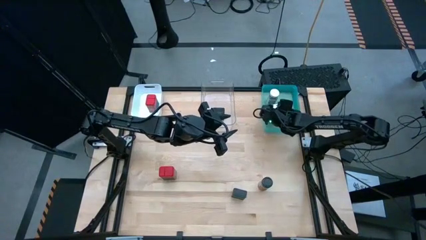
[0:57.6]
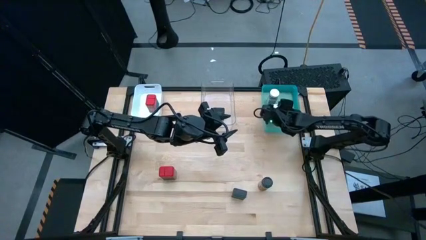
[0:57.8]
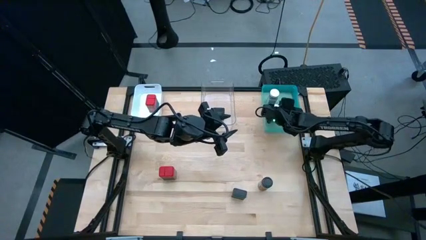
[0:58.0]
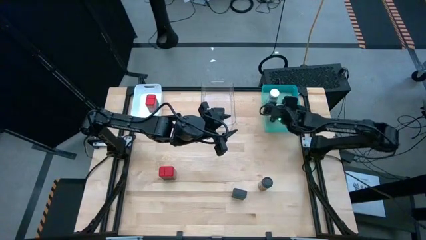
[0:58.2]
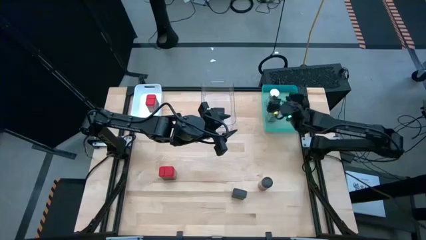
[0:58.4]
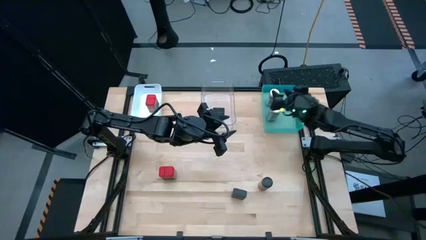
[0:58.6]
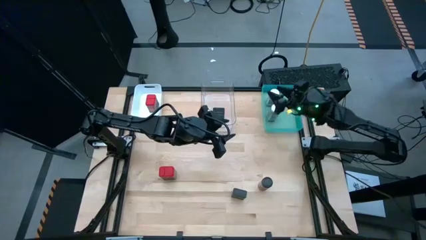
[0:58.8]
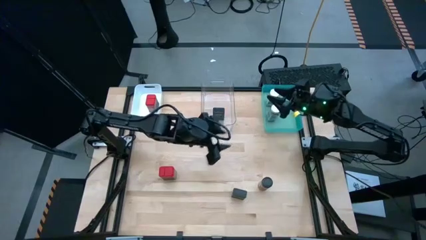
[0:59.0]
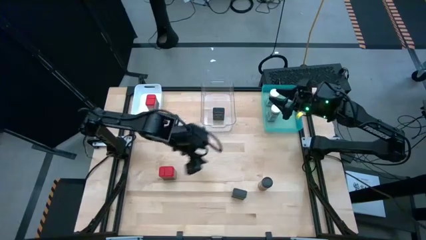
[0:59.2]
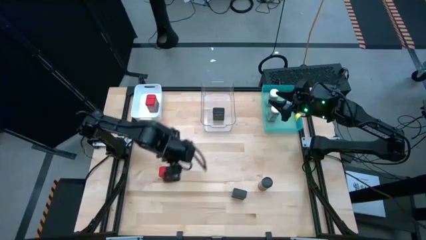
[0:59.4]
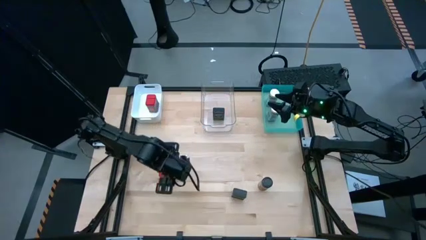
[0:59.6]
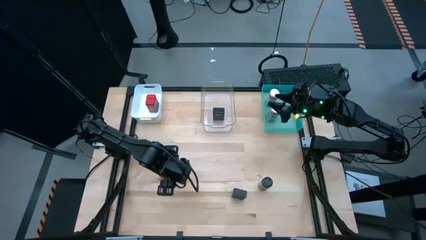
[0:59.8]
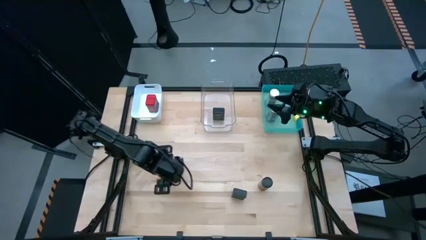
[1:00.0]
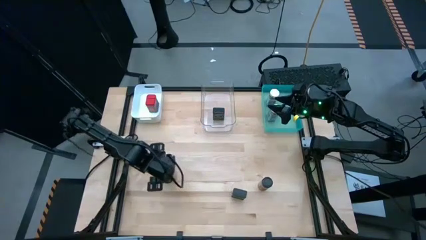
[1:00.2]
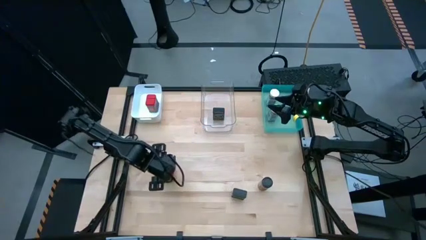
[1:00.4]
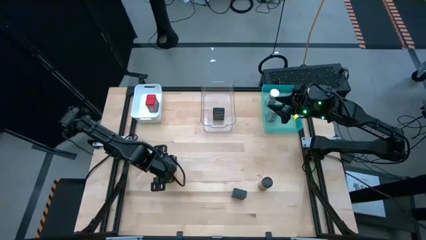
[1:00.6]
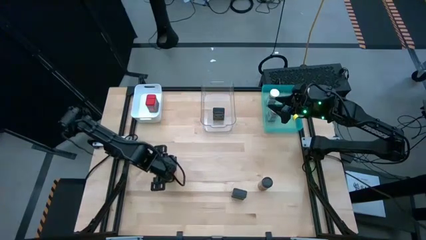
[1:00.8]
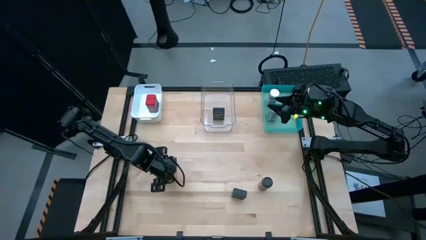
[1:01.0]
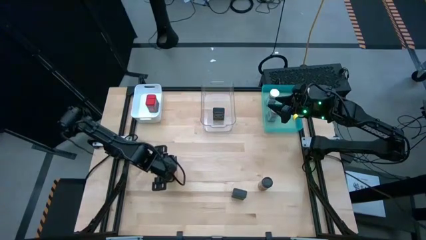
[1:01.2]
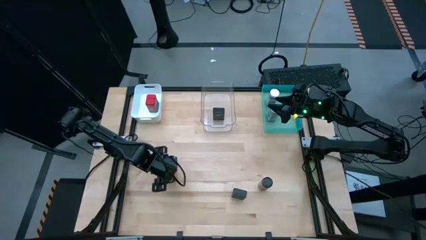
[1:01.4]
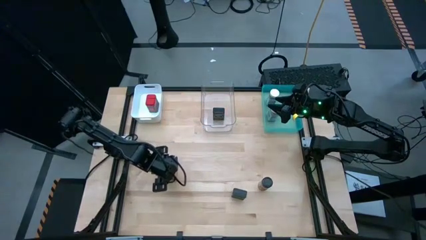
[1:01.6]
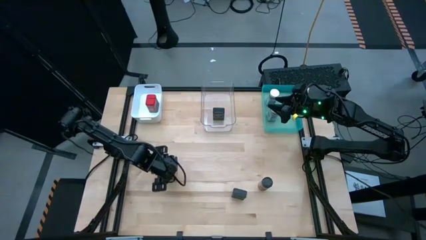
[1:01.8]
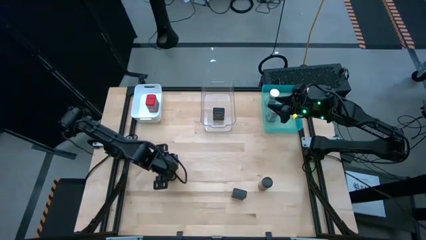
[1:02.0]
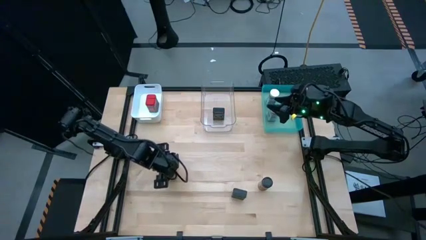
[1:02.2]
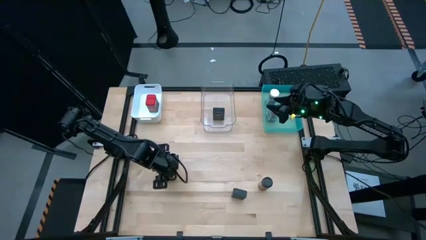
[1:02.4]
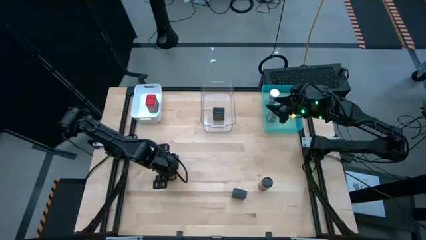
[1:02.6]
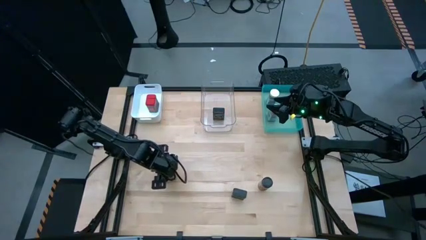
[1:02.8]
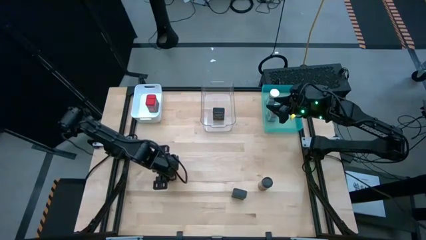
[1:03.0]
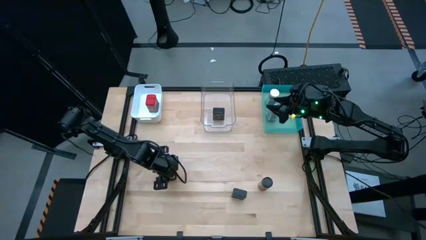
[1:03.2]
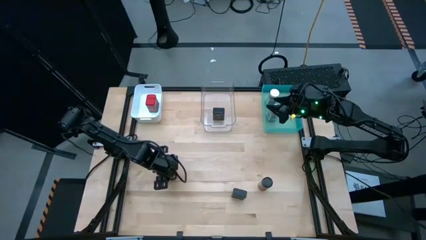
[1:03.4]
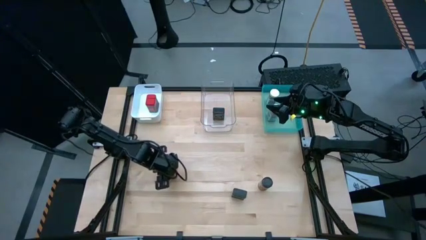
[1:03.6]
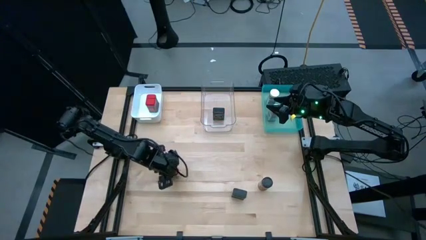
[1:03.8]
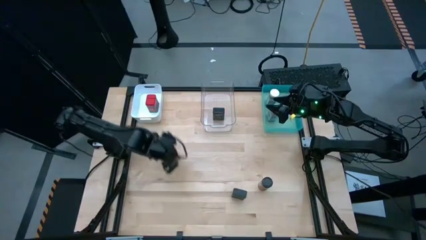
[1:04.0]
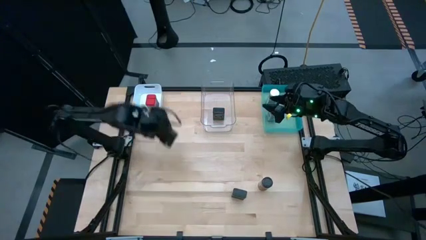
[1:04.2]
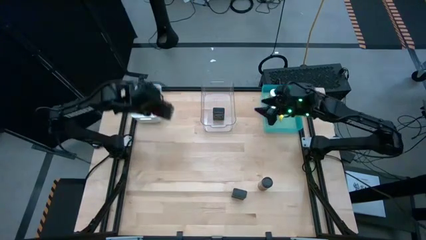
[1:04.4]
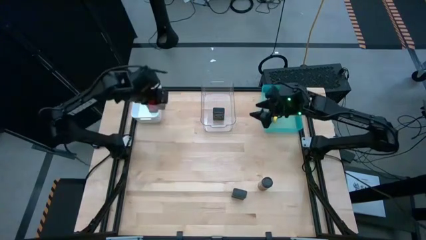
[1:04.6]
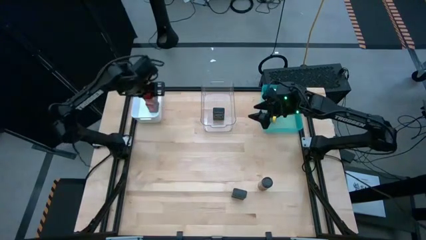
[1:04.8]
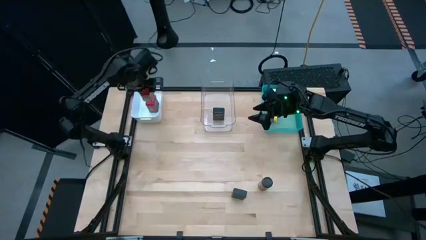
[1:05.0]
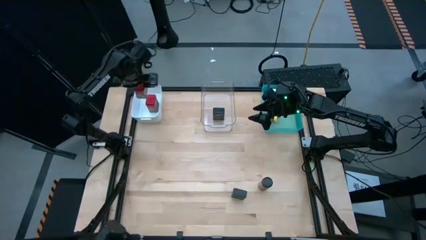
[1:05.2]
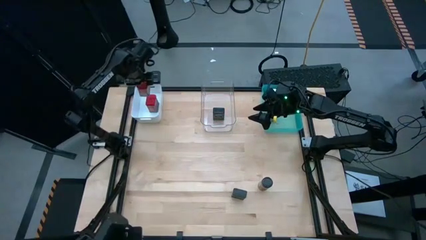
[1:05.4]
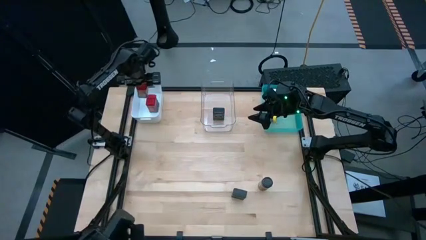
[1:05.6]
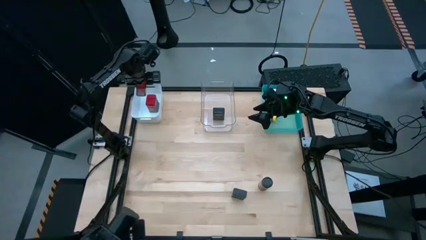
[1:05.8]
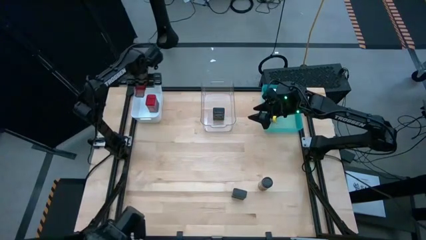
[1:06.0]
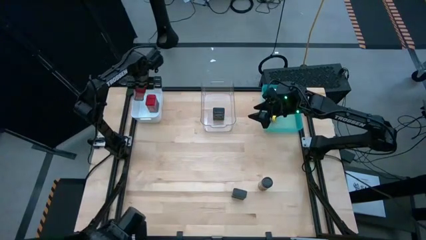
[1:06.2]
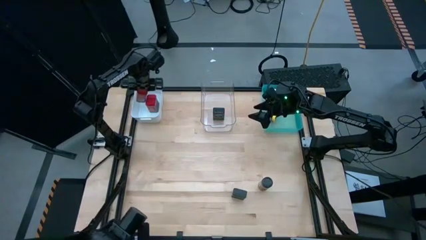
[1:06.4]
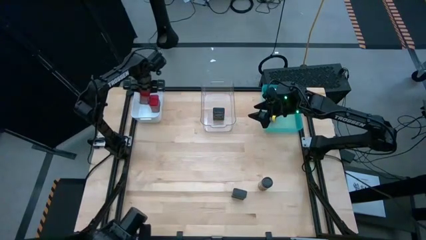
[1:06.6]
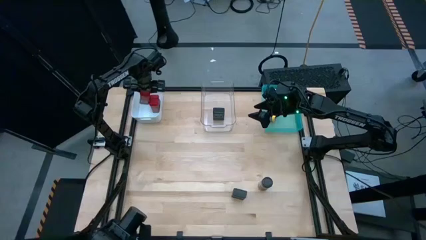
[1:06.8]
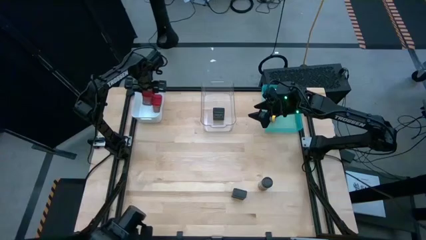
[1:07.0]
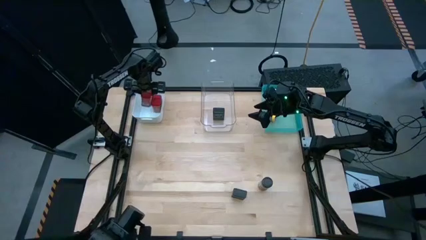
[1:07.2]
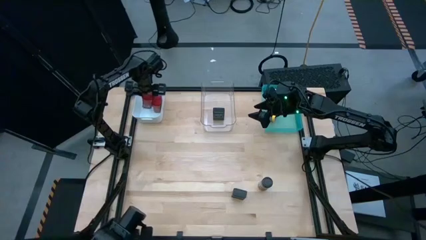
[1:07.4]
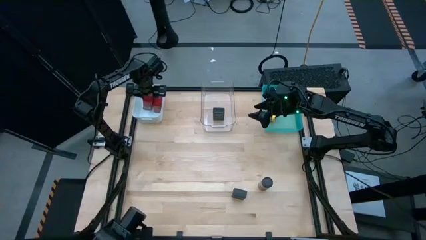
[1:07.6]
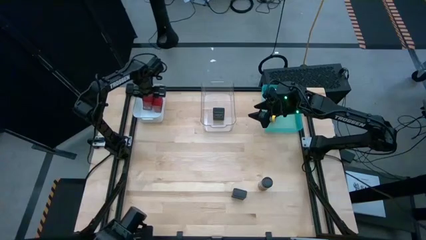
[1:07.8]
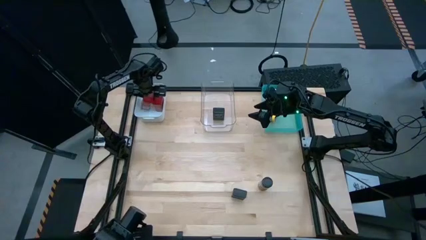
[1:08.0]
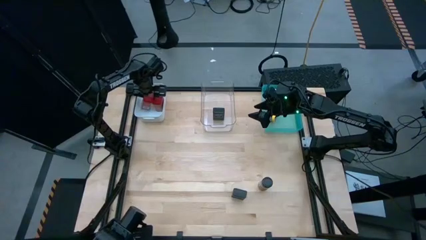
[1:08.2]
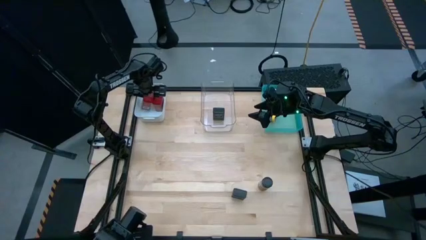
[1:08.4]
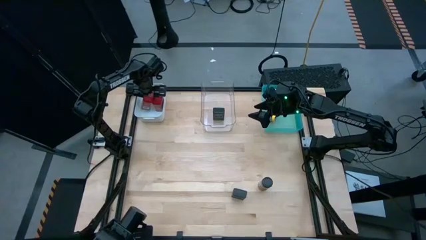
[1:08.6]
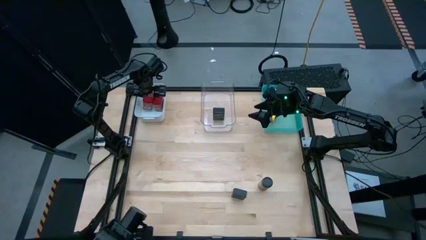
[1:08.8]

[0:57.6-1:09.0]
Task: Sort spices by type
Put the red seasoning can into the white bin

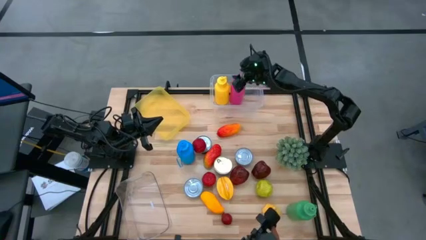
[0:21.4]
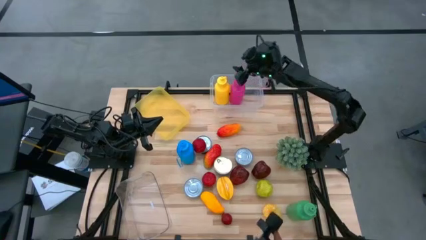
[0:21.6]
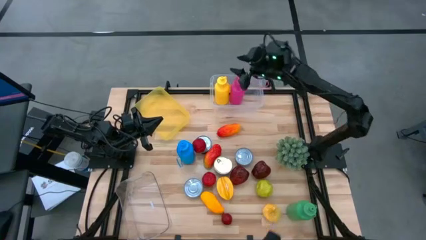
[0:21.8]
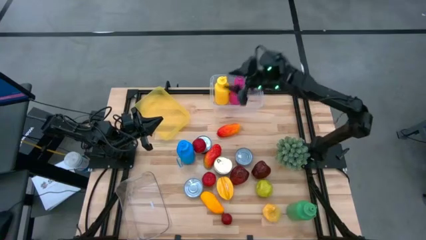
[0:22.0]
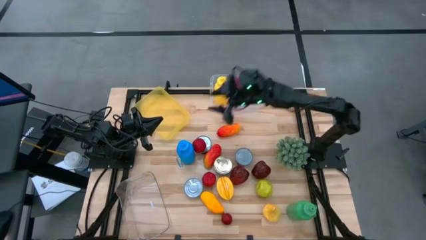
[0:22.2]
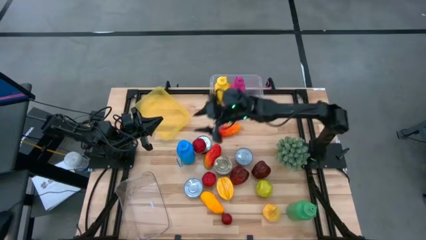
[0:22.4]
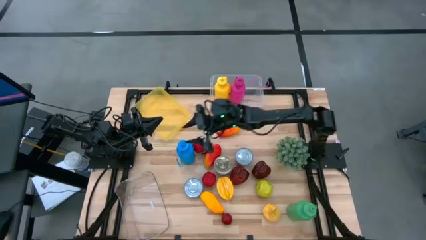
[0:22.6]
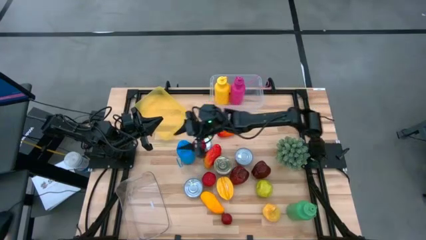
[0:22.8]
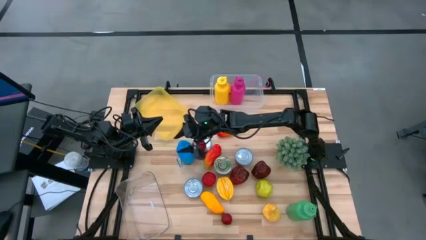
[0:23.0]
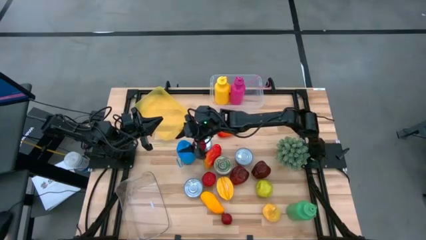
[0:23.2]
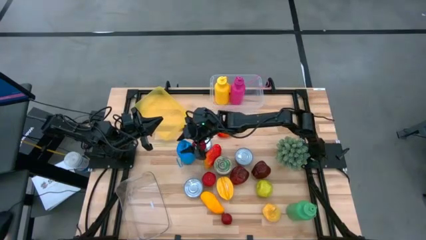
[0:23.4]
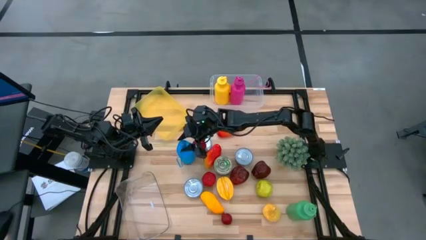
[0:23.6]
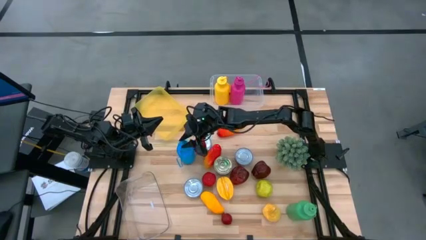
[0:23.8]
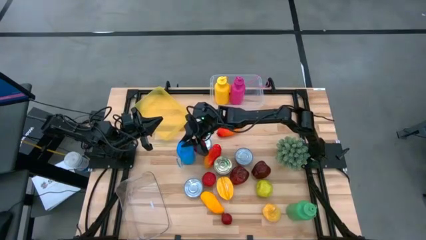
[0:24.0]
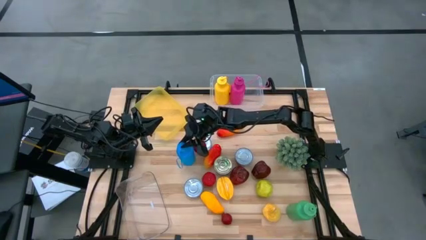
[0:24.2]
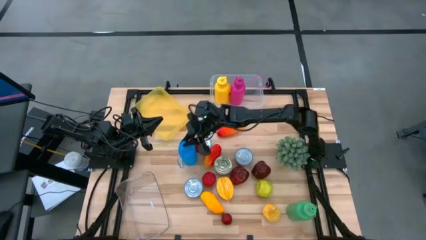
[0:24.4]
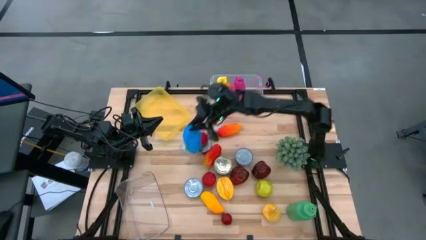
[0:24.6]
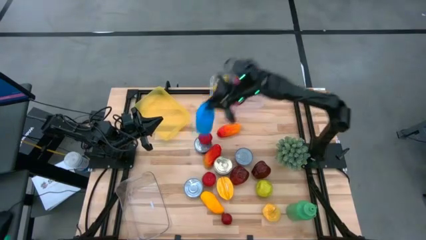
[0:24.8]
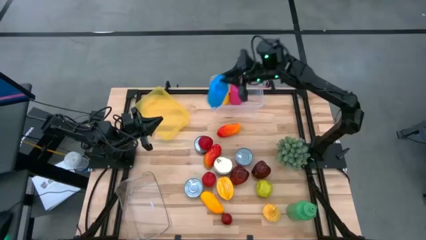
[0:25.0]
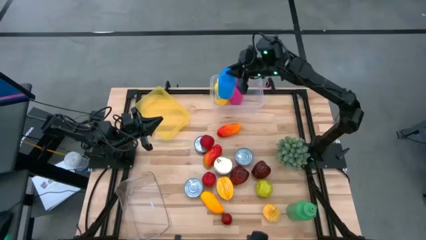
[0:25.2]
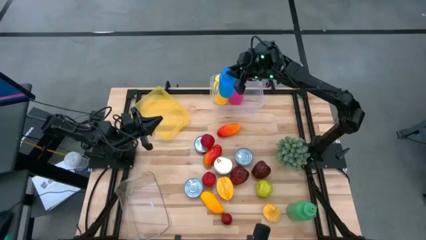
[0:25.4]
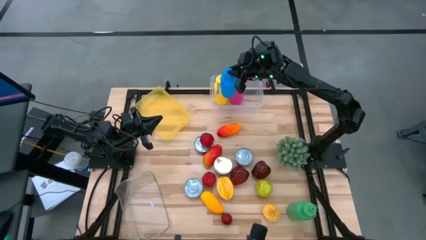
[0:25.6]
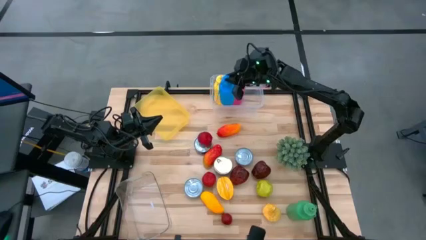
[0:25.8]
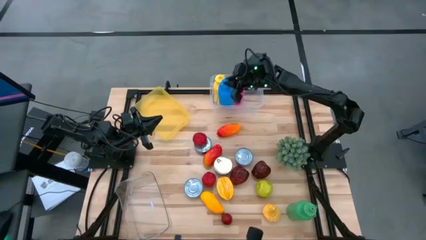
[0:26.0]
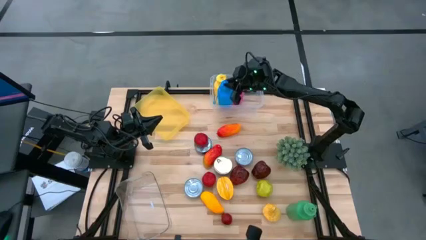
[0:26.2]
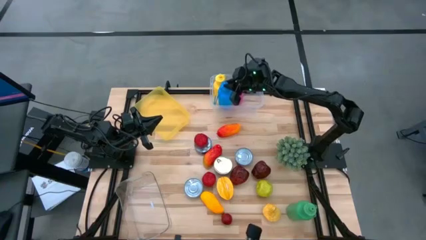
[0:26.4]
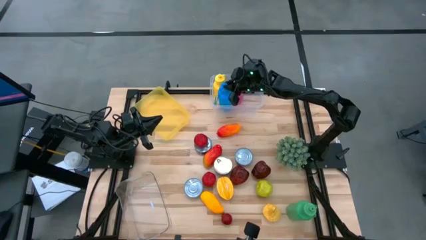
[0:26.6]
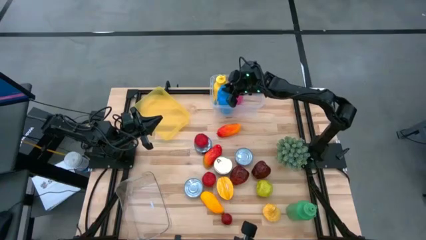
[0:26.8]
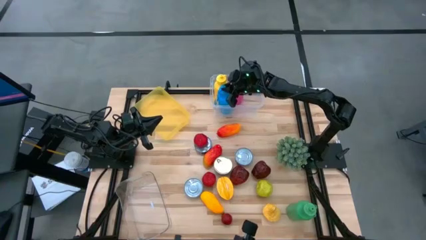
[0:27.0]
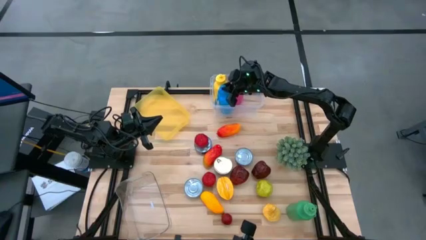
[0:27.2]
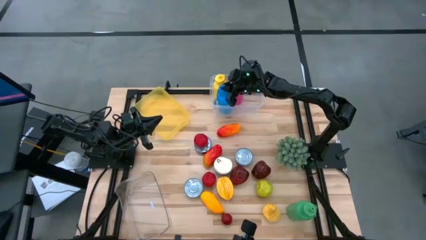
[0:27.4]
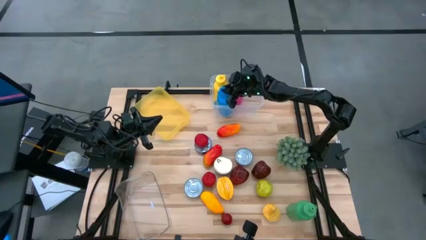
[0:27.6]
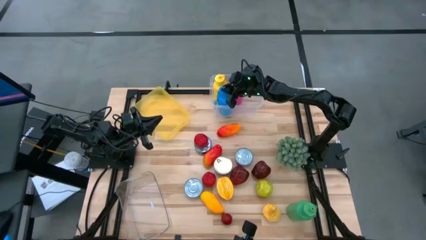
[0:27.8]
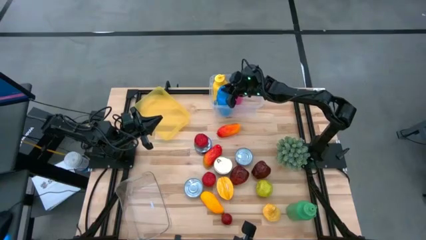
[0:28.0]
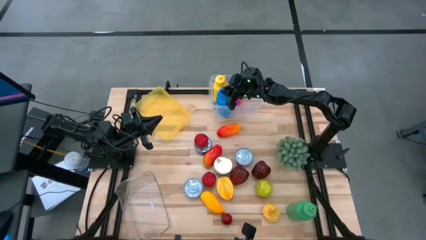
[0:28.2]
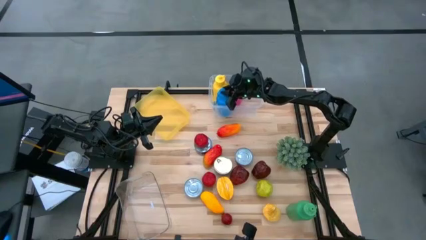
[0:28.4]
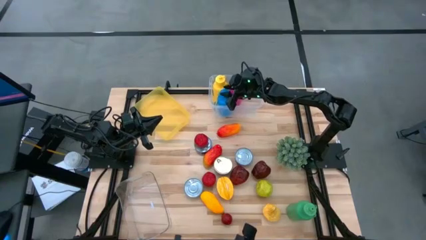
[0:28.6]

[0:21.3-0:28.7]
Task: Pick & Place Food Item
Put the blue water bottle into the white transparent bin
